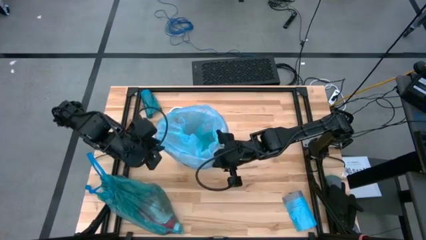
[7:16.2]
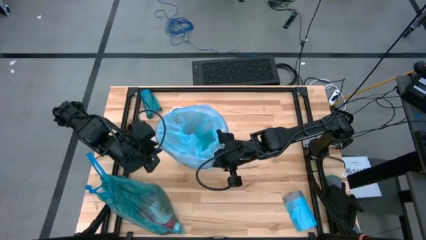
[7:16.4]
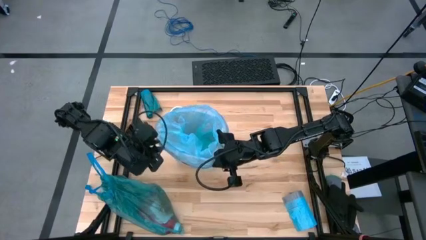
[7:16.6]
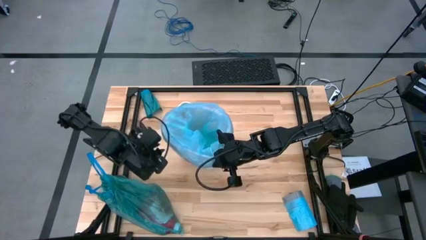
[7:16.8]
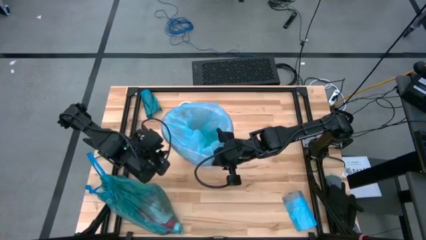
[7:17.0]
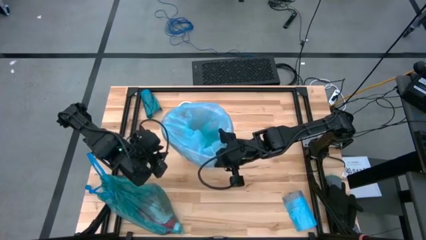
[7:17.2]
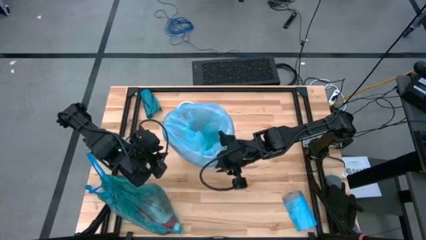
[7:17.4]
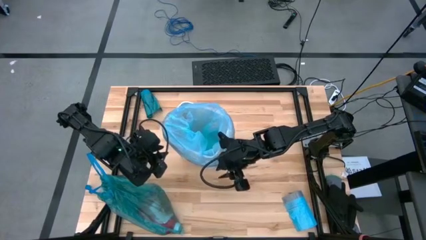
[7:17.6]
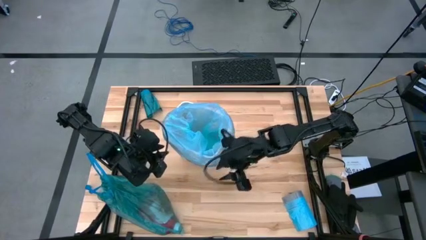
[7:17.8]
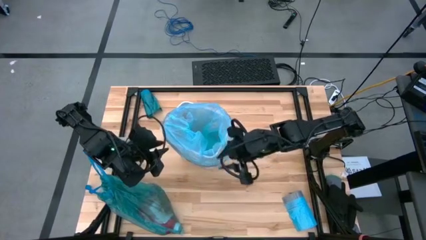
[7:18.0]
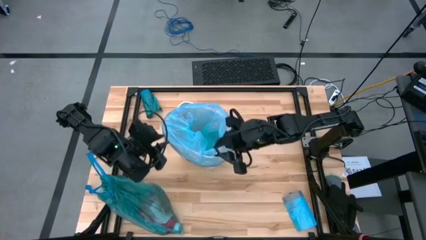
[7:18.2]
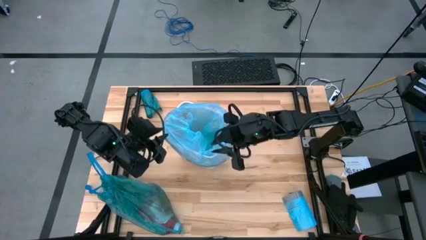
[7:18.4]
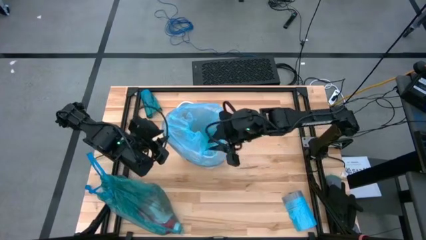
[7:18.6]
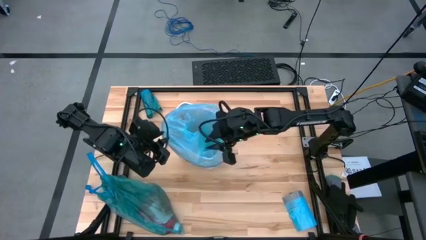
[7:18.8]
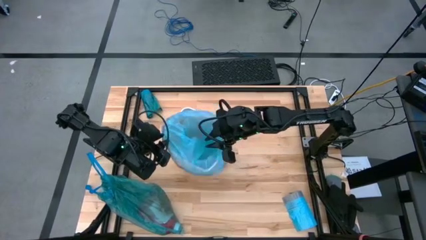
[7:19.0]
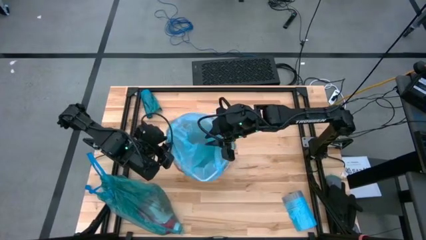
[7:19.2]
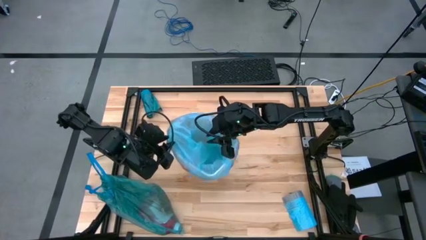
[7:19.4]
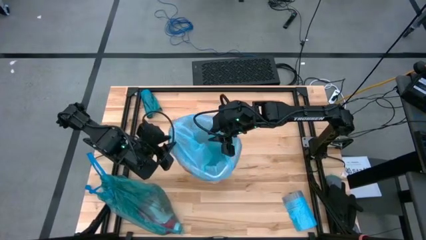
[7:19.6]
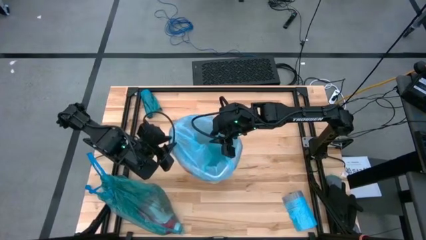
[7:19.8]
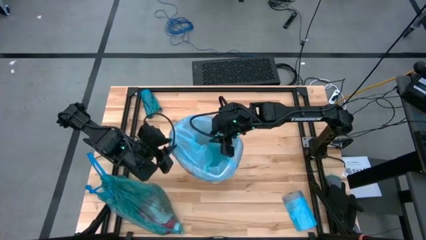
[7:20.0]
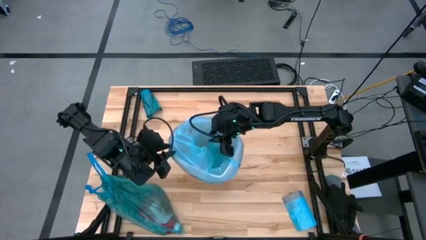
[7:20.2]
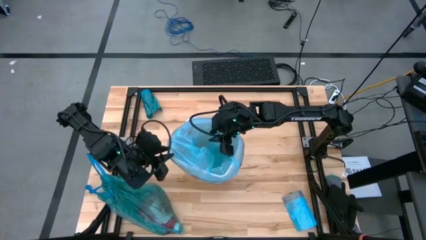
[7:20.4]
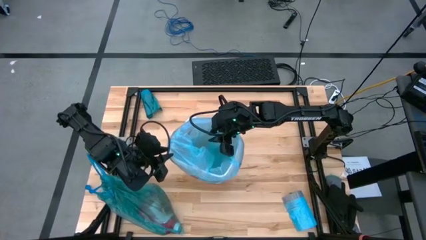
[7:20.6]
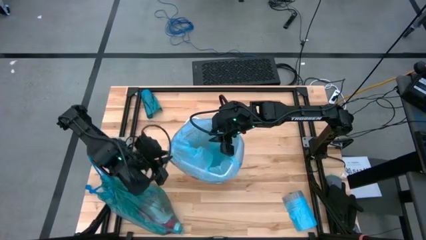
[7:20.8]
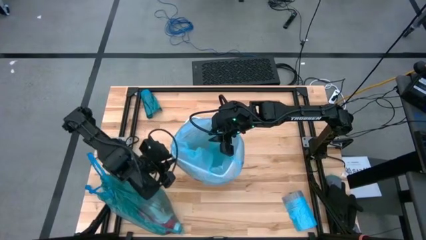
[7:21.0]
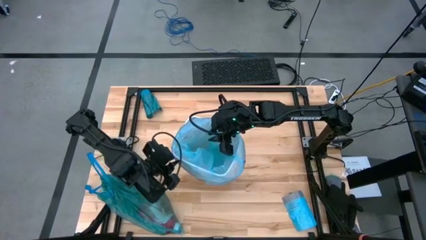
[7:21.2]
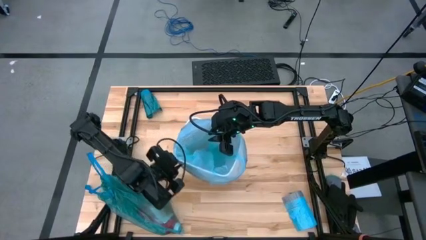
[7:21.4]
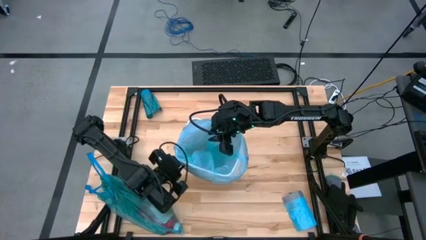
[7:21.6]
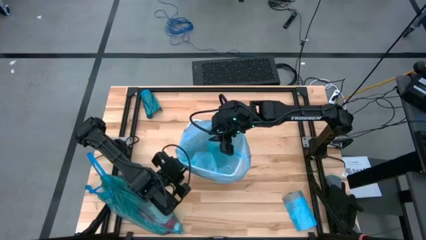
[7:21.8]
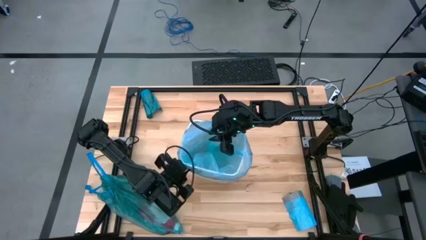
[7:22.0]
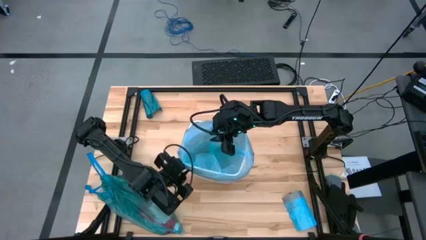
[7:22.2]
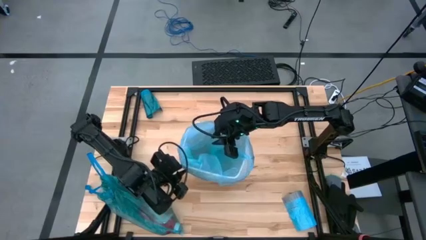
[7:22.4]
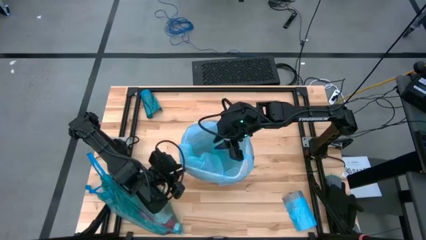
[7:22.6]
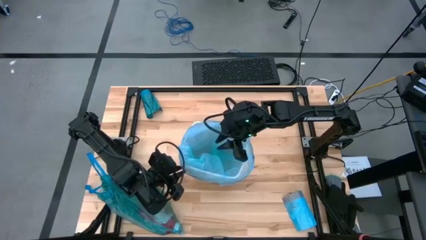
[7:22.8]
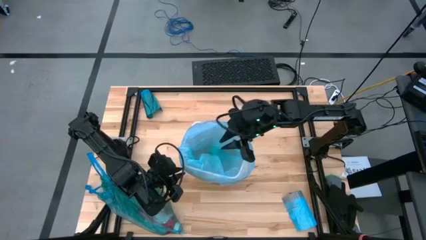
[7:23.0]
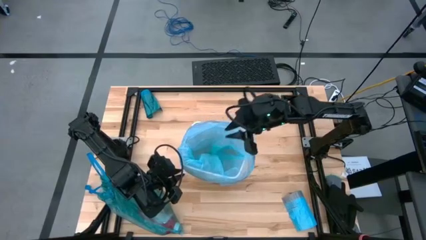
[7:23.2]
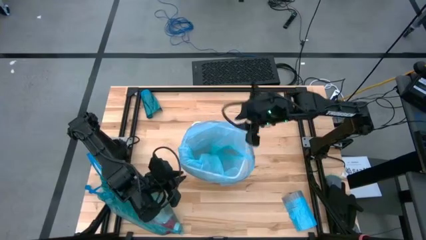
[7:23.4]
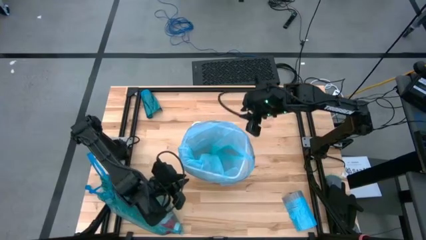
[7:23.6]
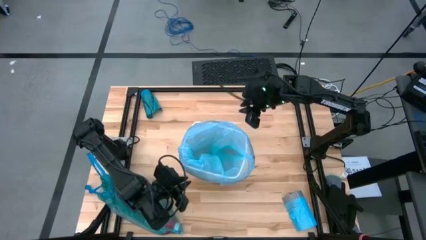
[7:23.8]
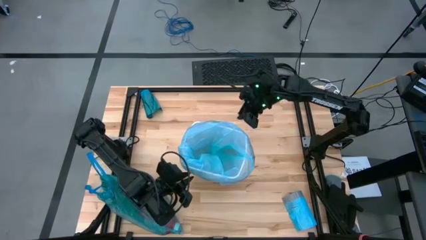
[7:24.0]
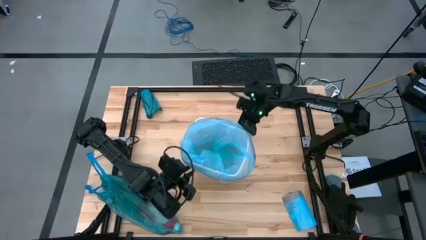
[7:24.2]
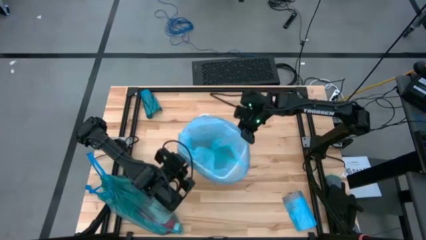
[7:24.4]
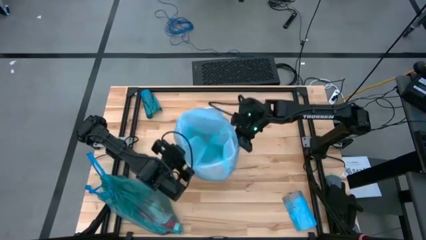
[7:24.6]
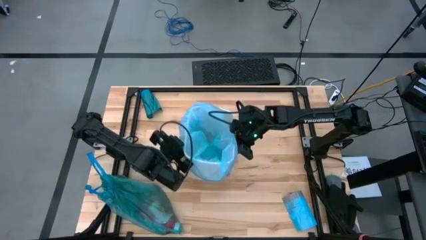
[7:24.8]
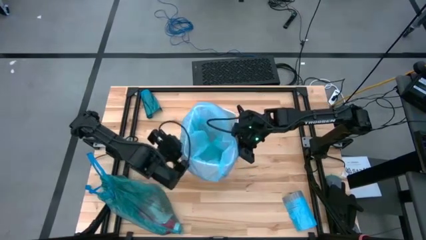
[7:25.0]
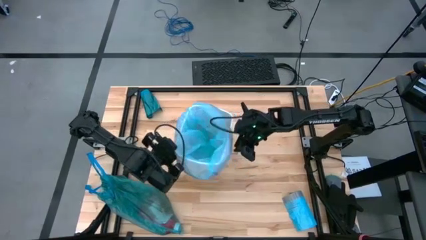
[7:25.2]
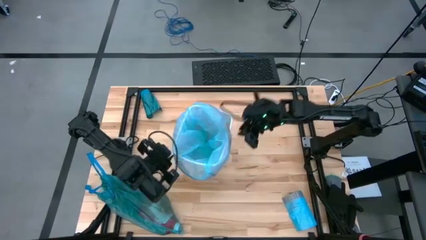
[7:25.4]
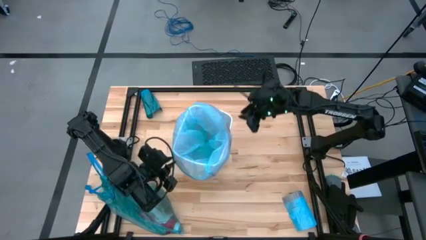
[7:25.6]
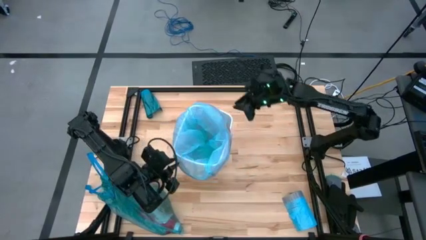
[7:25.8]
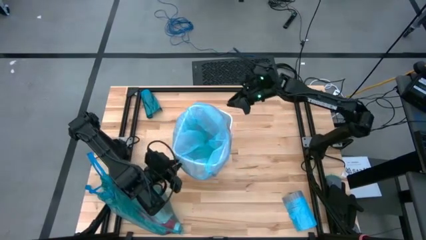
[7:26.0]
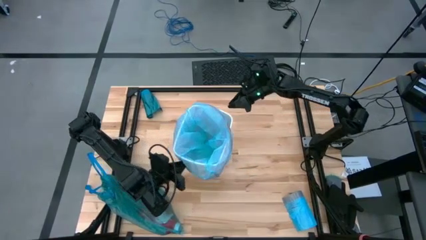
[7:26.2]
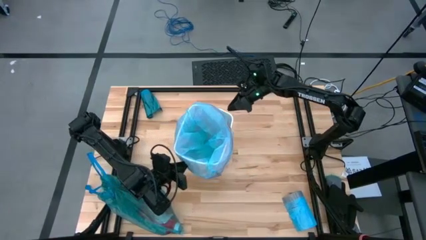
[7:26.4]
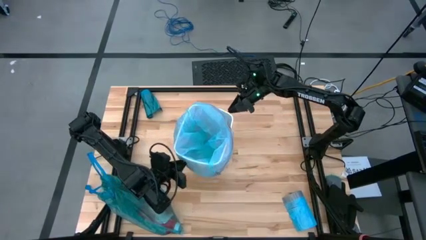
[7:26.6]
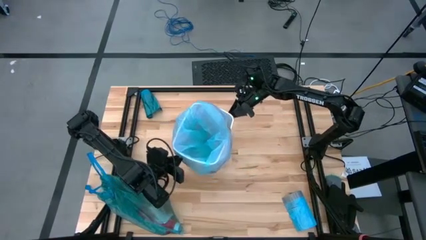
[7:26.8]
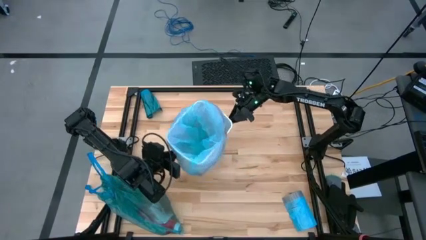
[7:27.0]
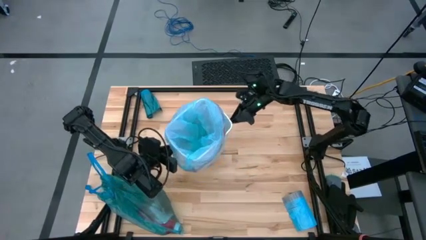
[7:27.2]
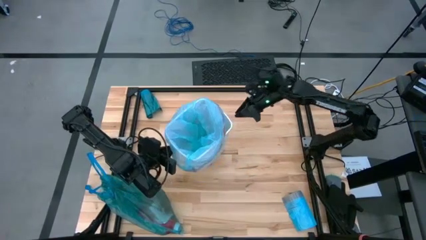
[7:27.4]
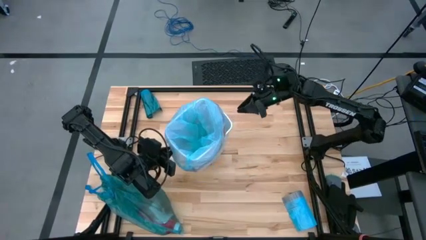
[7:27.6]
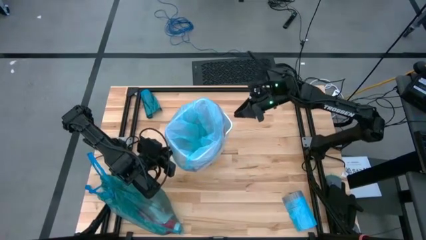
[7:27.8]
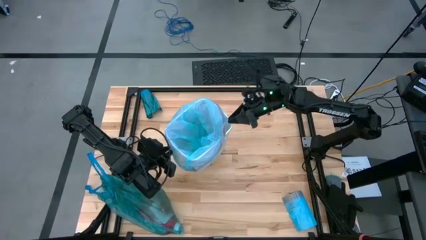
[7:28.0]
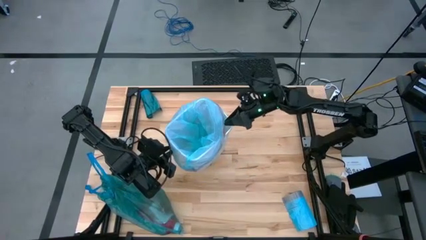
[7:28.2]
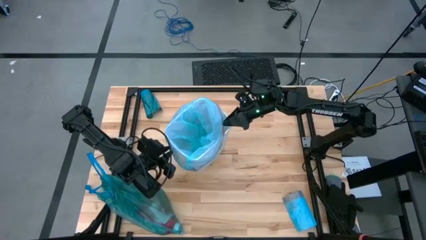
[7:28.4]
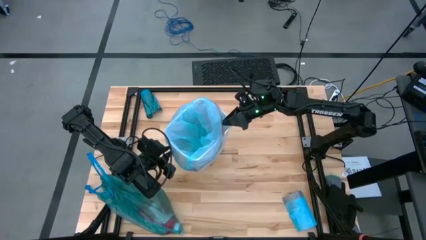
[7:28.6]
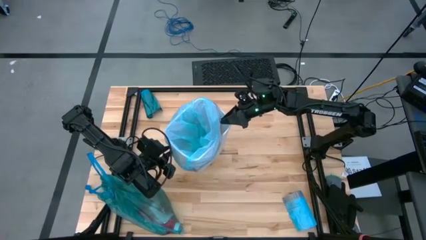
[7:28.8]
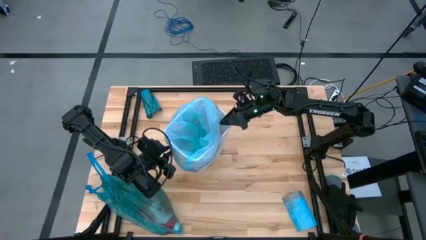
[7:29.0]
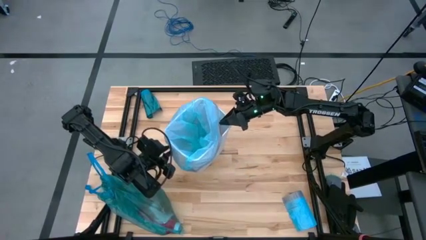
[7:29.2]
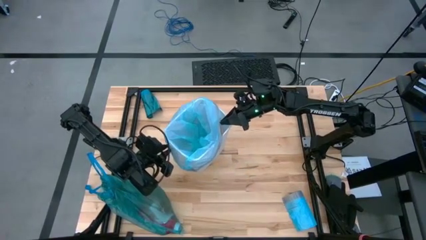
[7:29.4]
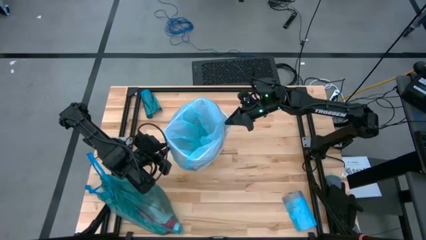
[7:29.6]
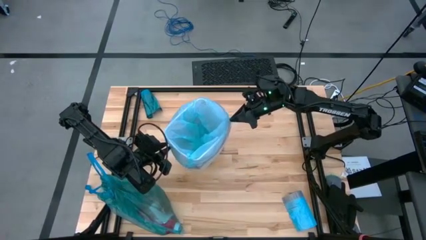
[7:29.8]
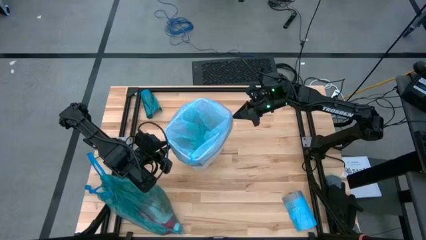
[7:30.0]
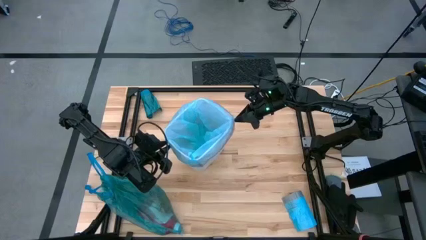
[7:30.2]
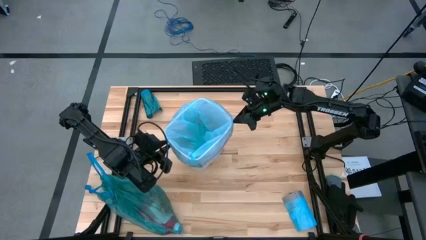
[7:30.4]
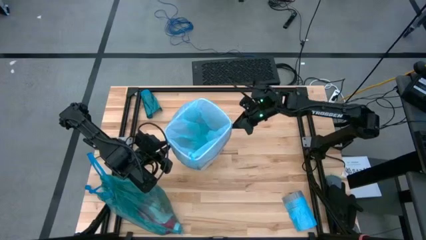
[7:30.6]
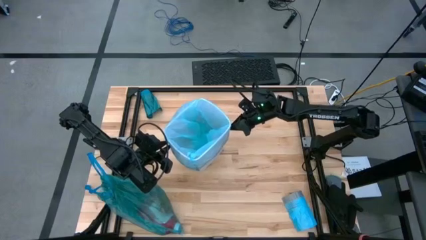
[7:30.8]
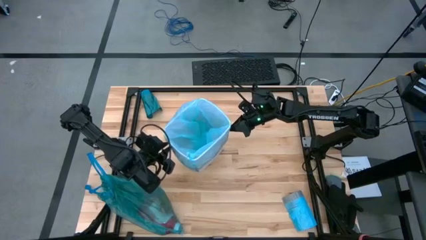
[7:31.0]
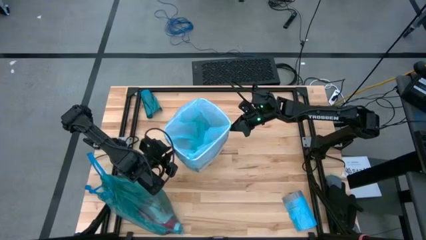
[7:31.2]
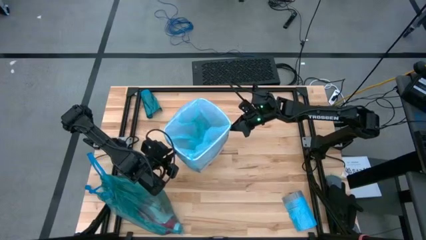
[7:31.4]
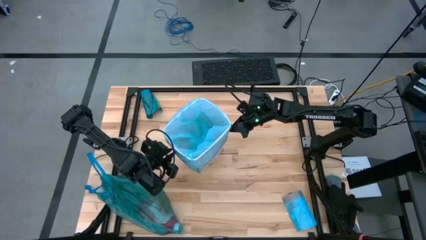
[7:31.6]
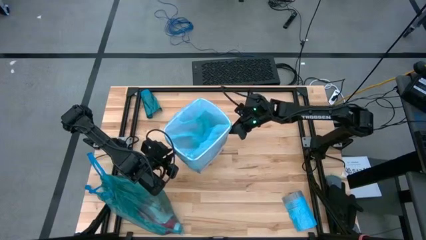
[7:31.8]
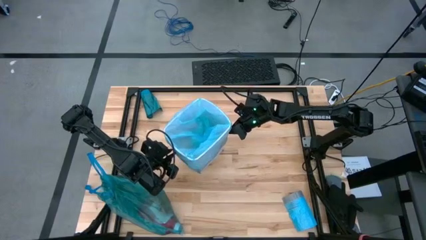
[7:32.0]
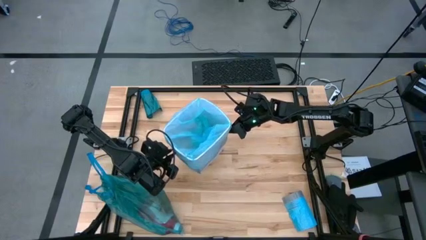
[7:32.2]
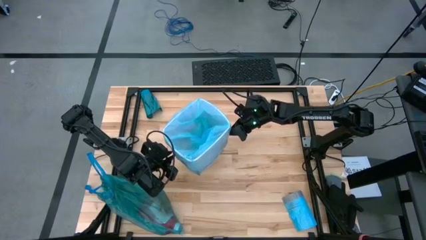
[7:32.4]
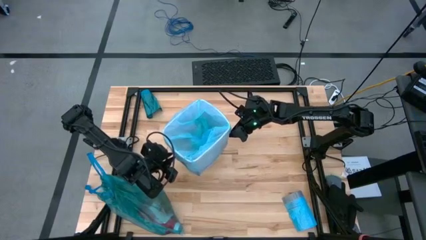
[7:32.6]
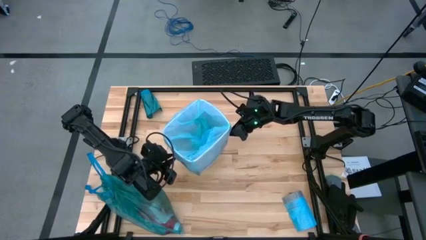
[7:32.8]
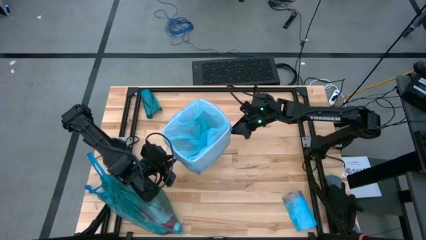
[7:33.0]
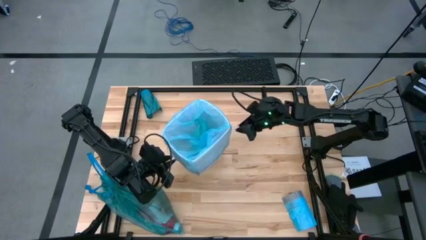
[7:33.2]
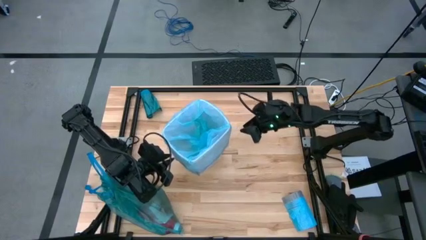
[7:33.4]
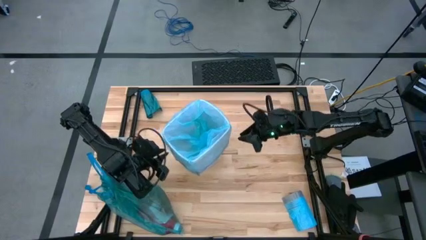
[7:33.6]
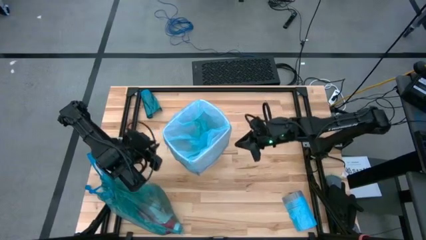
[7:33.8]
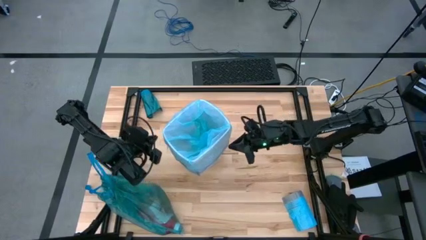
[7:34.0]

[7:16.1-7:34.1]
Task: place trash/remove bag and relplace
Insert the new blue trash bag into the white trash bin
